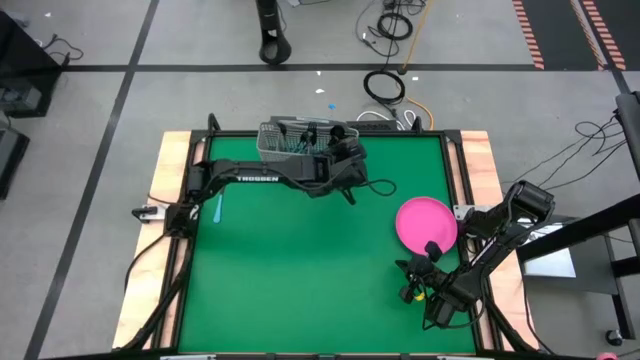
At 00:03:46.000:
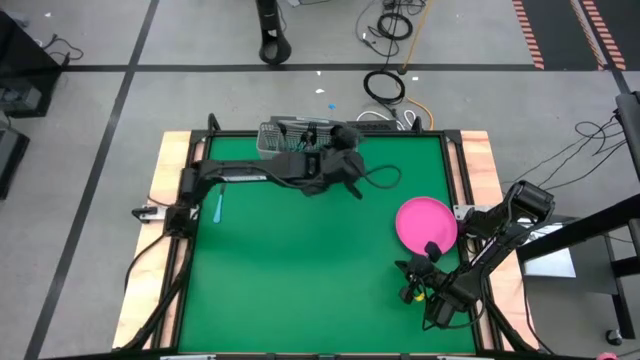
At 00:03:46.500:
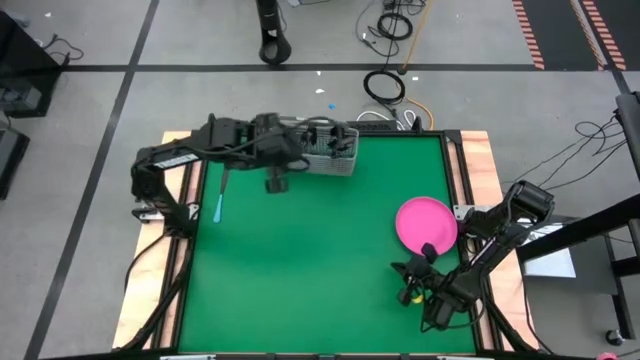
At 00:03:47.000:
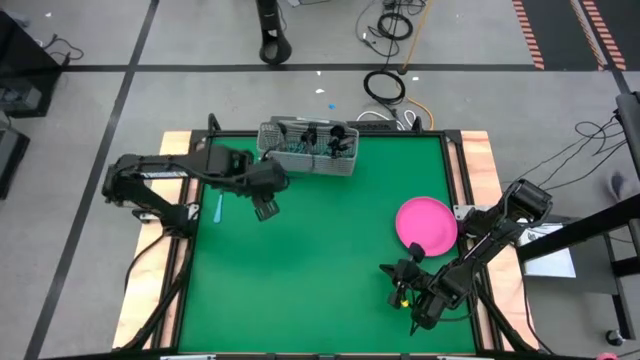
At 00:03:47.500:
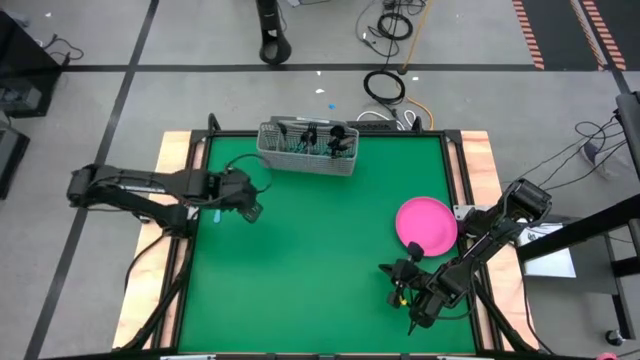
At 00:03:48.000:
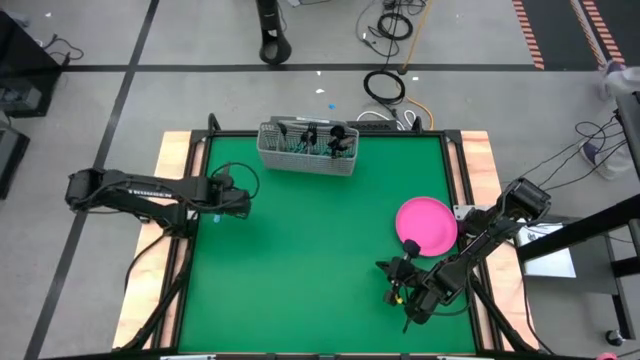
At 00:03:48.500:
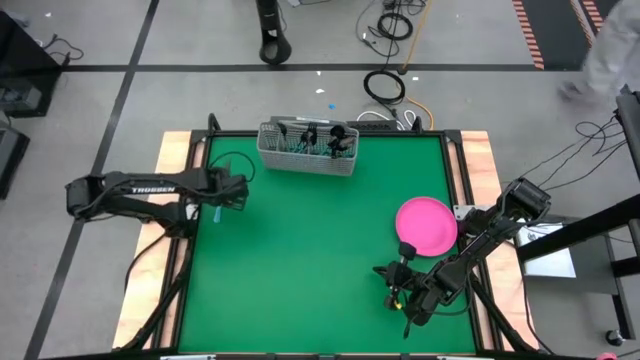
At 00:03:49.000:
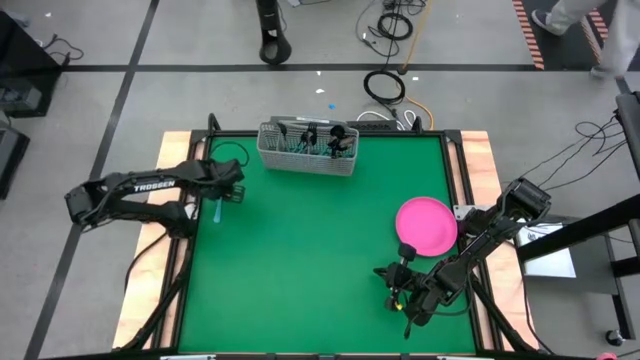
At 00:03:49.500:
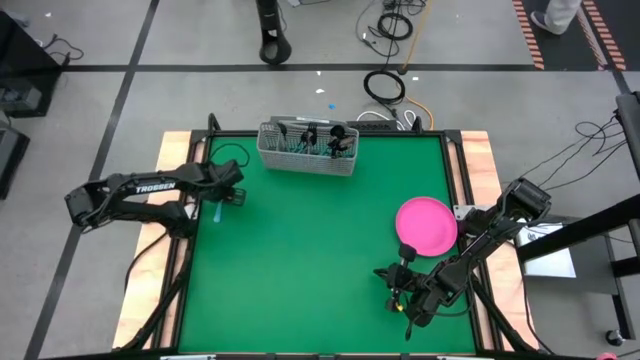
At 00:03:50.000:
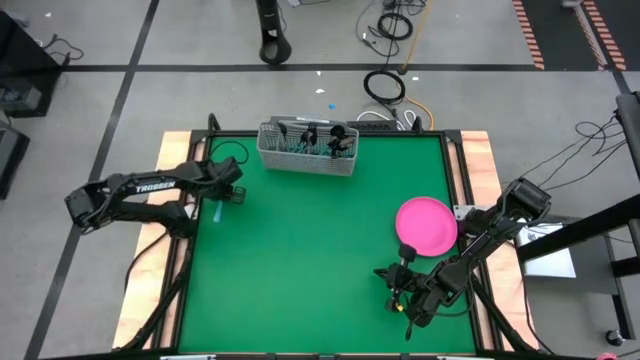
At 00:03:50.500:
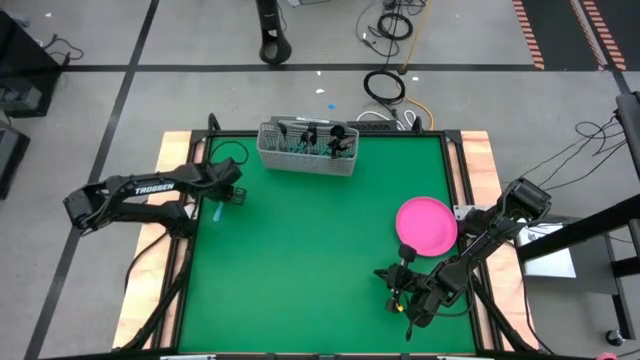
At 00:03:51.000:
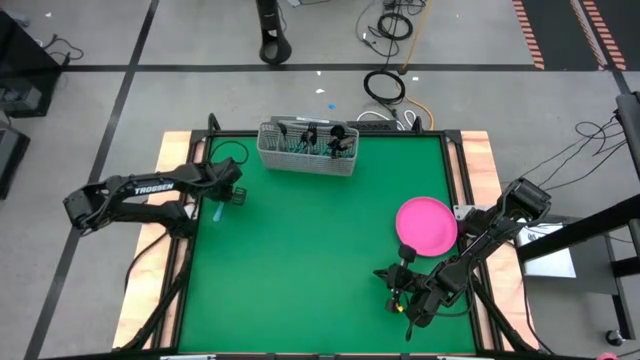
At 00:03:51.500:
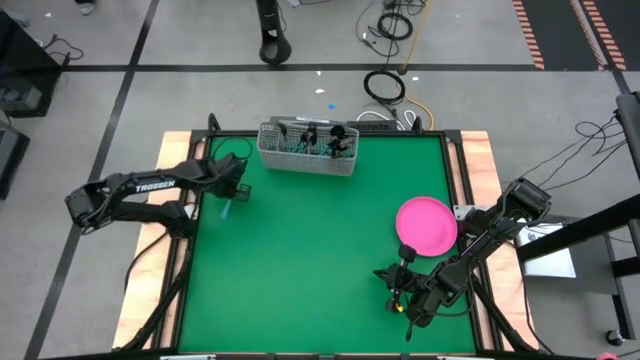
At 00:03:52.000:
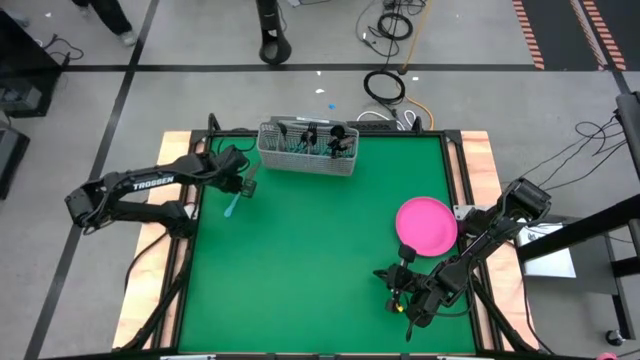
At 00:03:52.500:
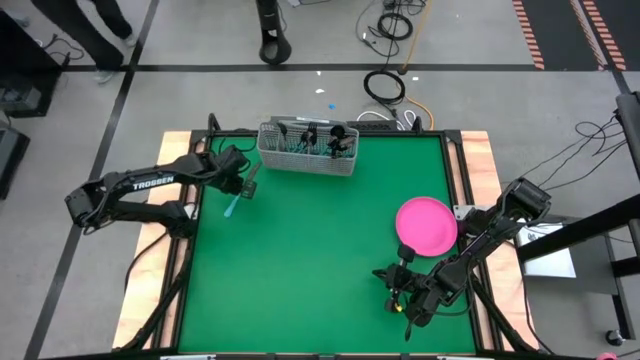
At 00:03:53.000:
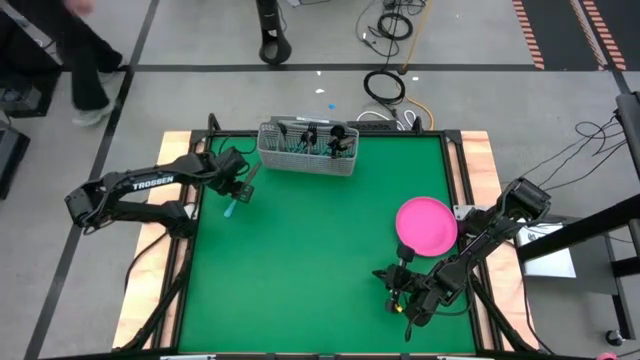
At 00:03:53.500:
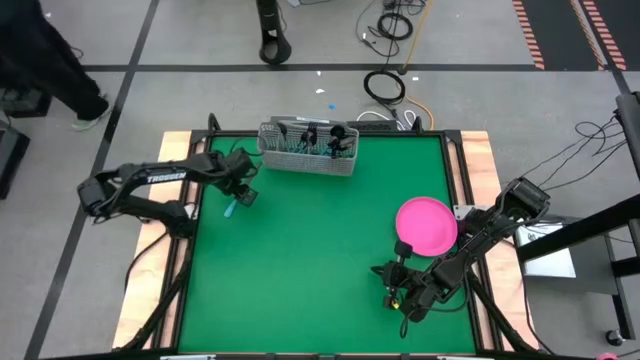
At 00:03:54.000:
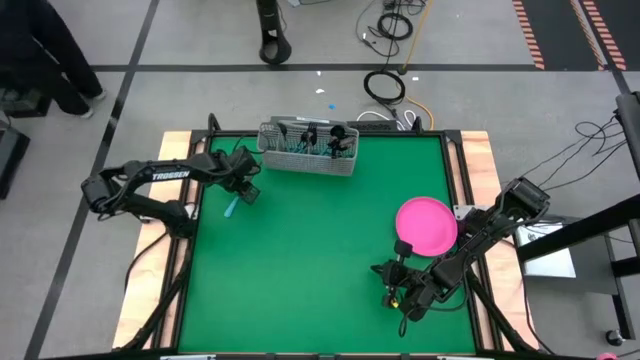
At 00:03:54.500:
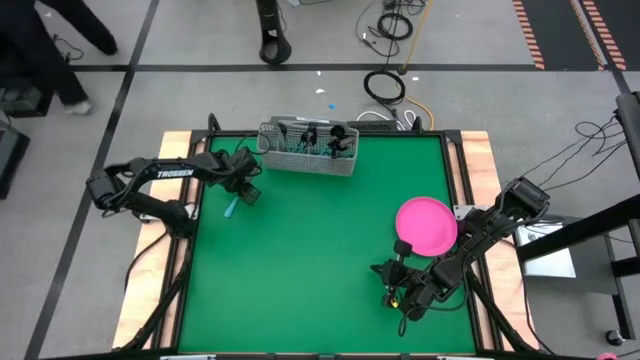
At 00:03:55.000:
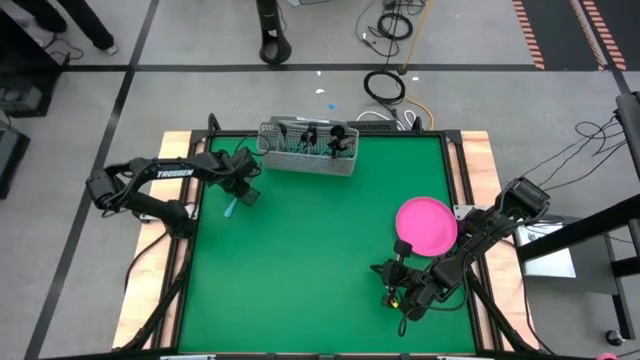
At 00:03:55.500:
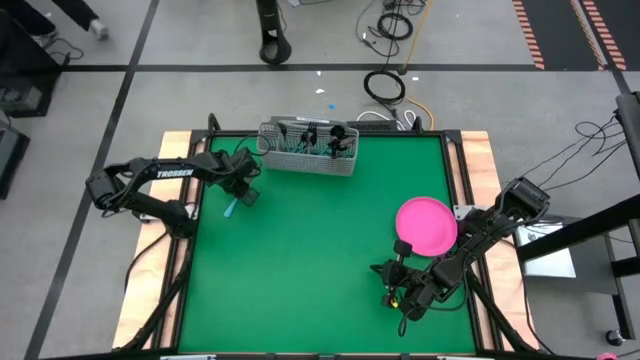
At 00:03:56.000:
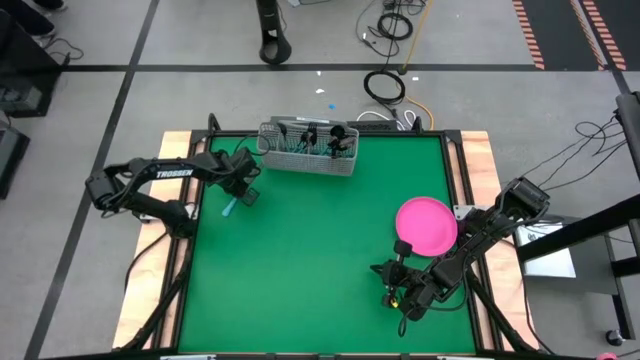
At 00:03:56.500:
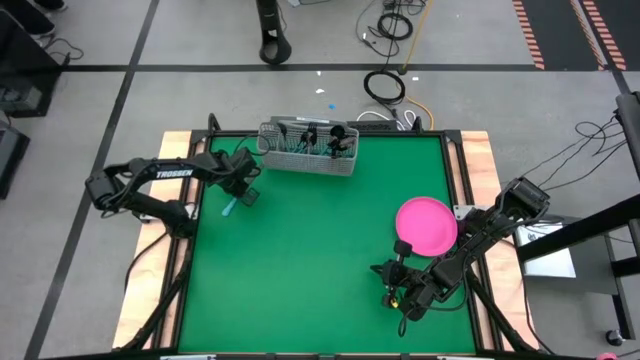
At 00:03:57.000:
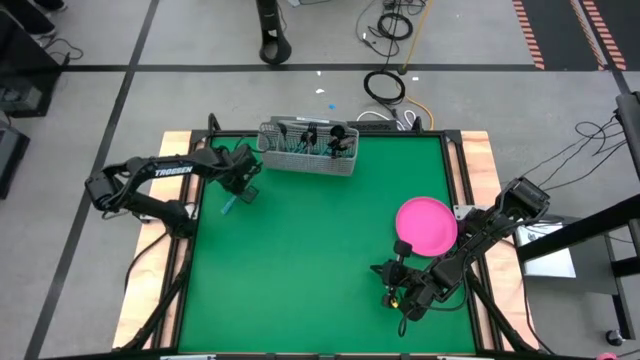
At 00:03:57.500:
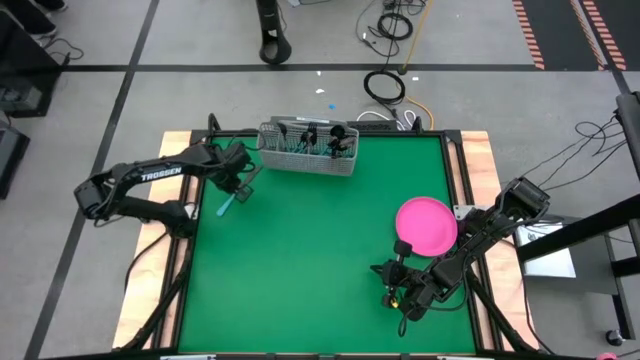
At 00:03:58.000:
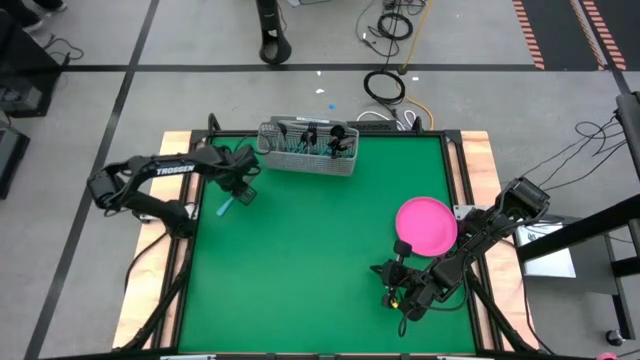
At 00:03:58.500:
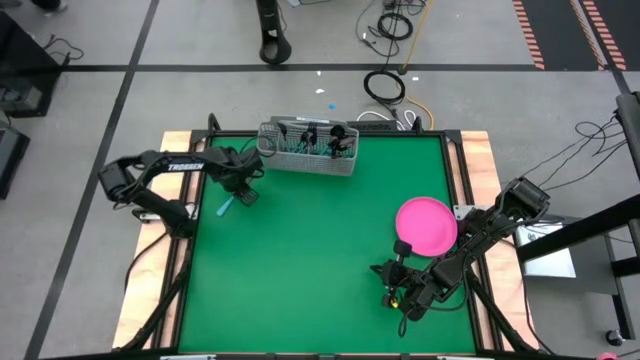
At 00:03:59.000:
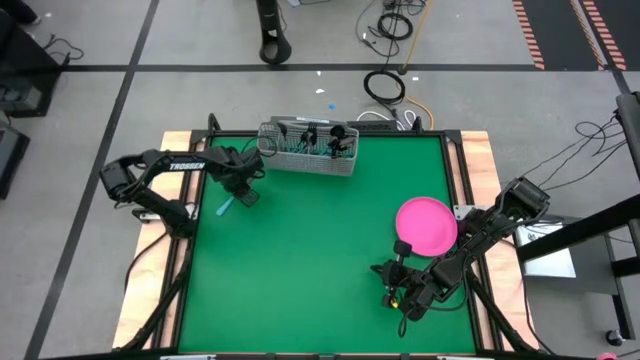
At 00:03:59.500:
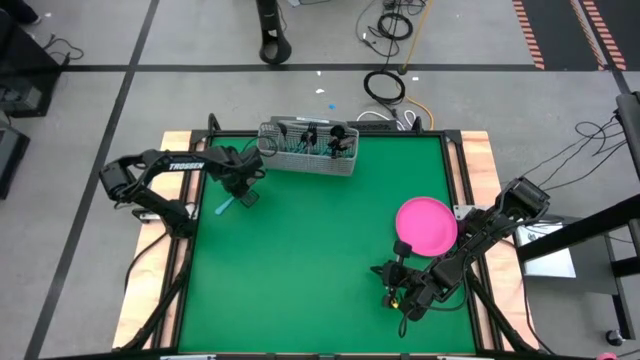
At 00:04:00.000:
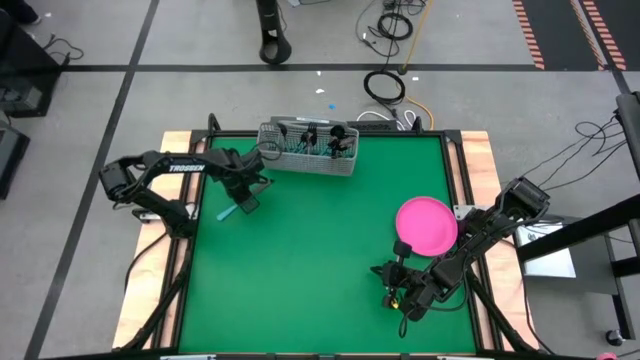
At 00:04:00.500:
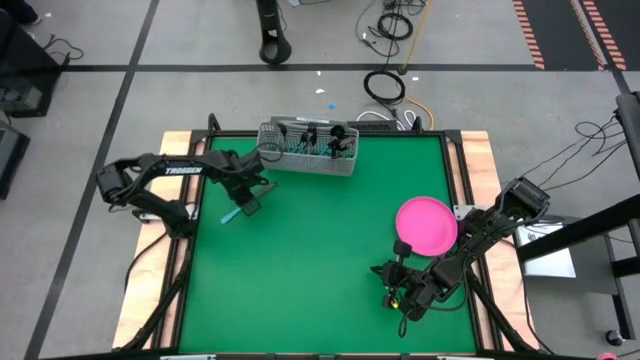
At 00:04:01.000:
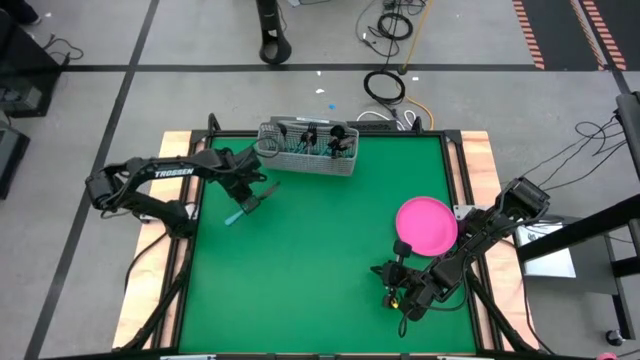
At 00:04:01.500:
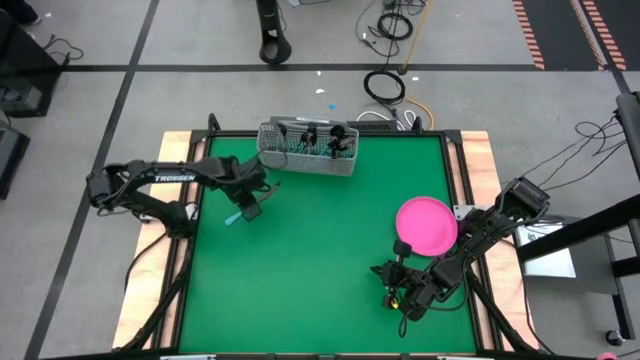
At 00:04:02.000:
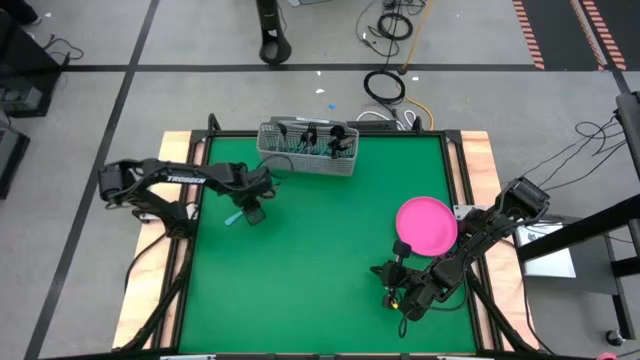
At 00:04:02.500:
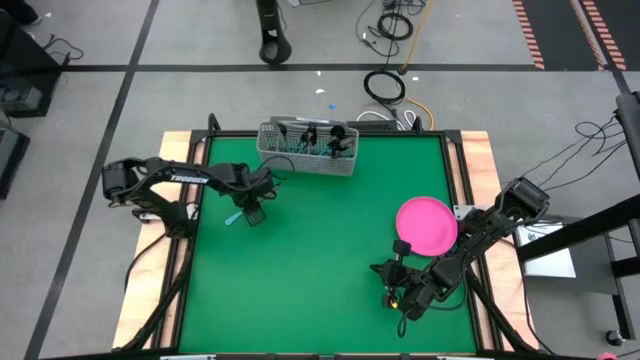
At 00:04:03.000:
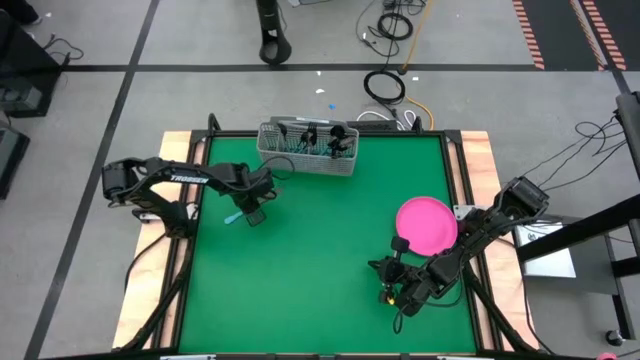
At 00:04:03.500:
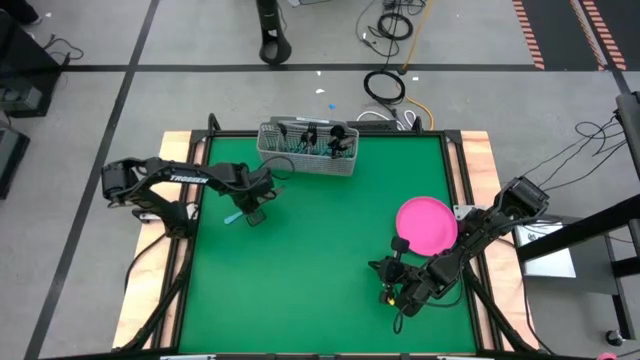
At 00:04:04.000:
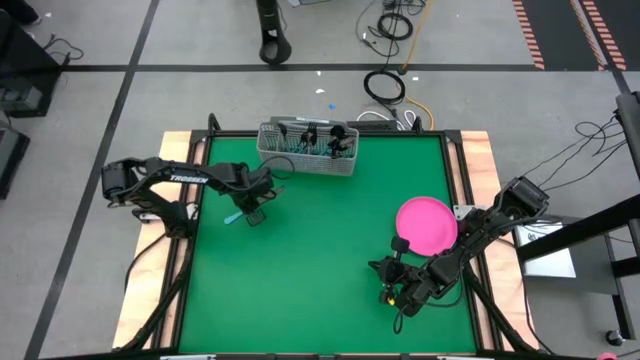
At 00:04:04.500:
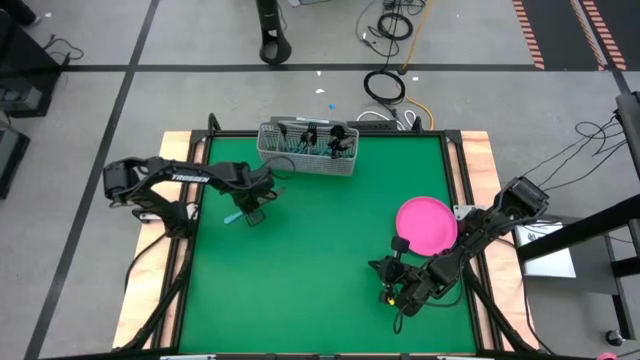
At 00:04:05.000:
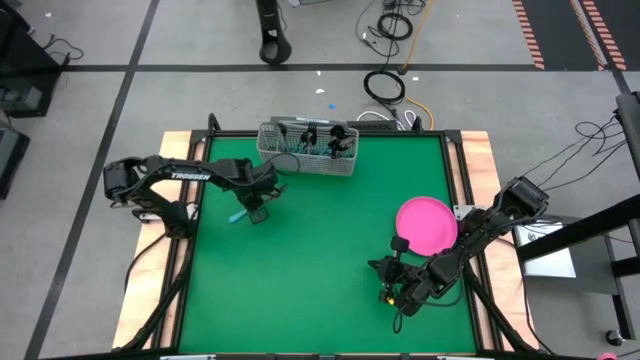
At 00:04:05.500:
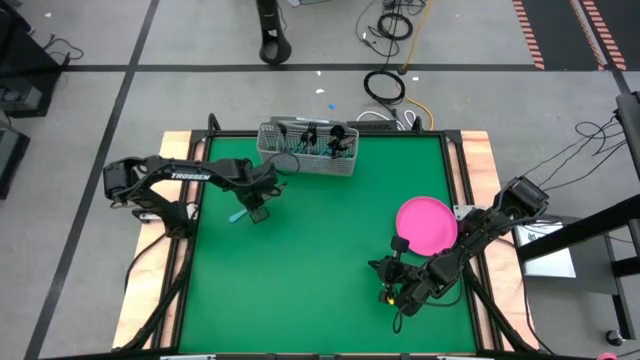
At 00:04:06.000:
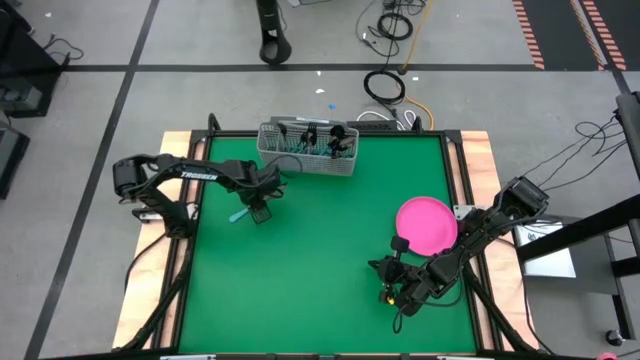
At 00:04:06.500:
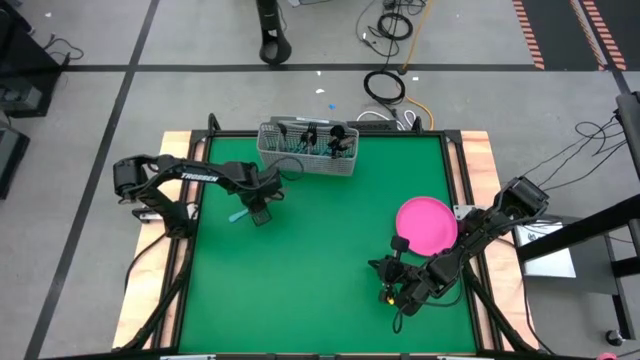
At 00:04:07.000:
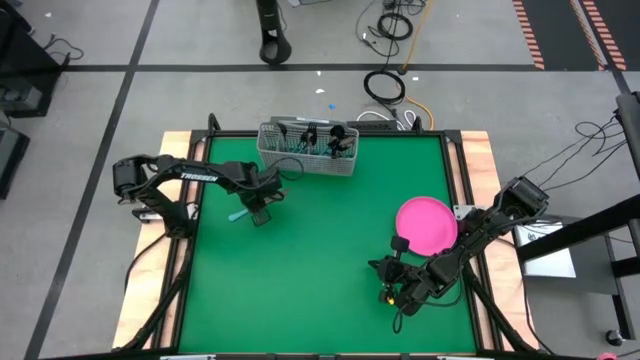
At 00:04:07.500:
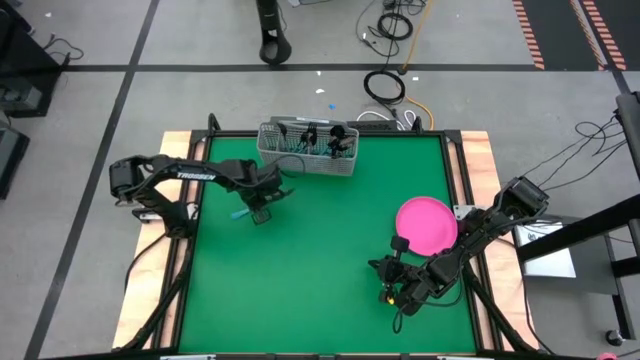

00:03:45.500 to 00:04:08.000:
Task: Sort silverware
Put the blue table knife into the silverware tray with the other blue table knives
